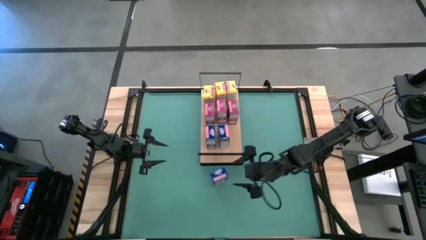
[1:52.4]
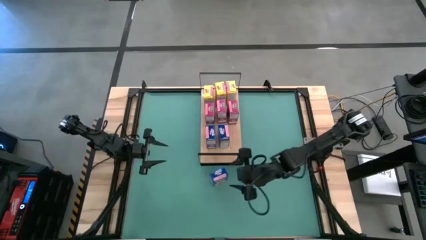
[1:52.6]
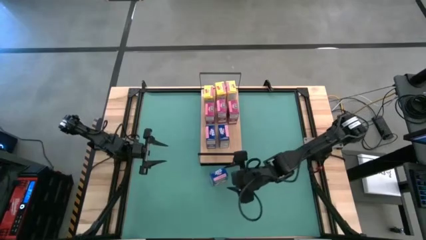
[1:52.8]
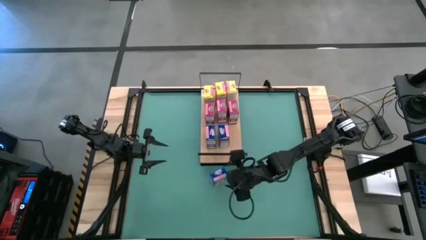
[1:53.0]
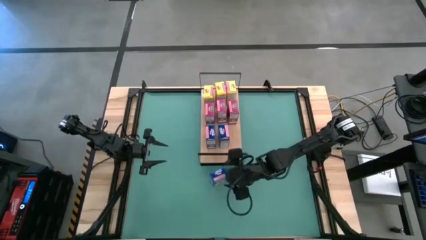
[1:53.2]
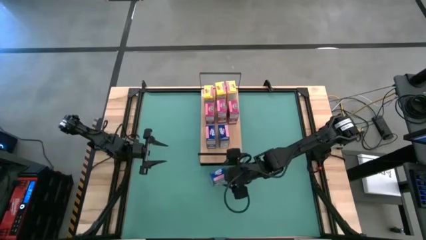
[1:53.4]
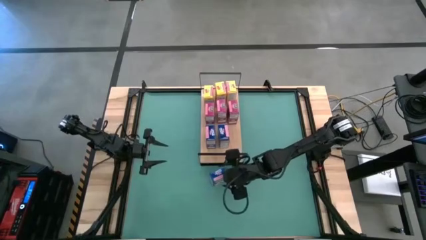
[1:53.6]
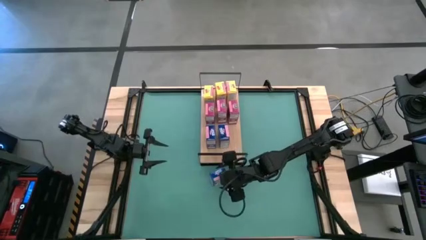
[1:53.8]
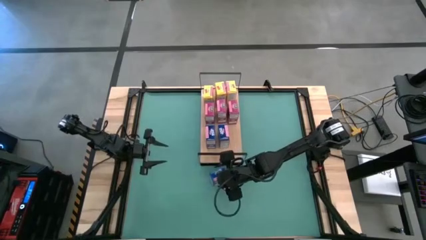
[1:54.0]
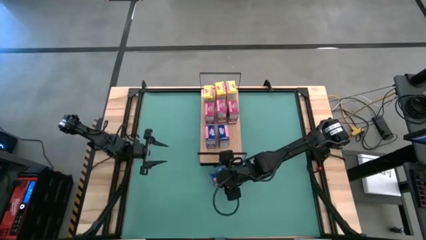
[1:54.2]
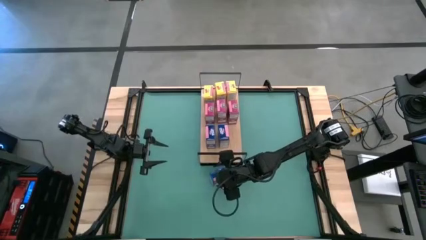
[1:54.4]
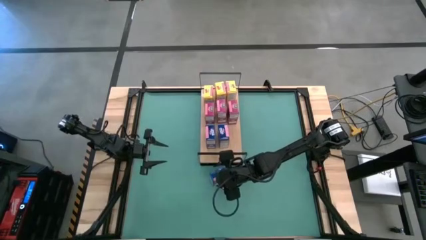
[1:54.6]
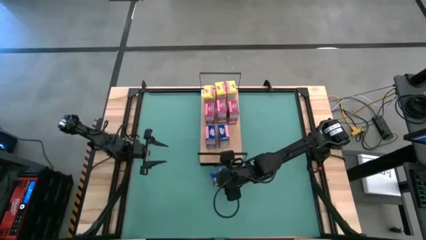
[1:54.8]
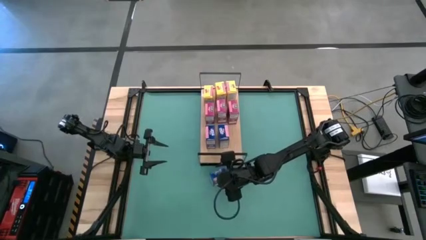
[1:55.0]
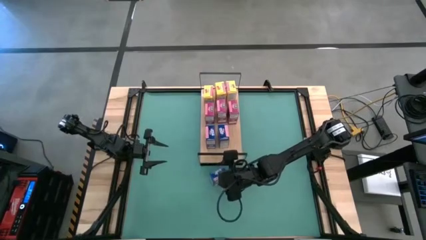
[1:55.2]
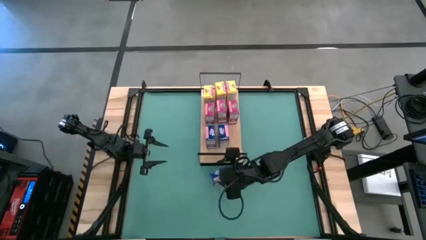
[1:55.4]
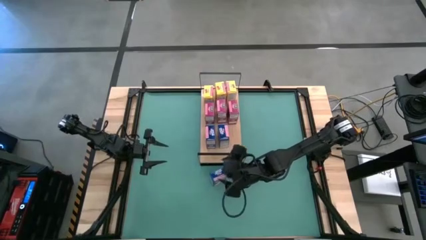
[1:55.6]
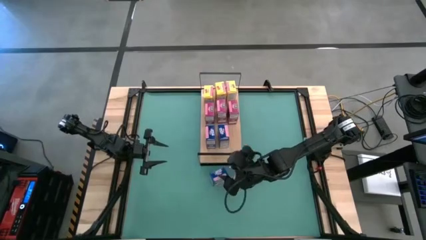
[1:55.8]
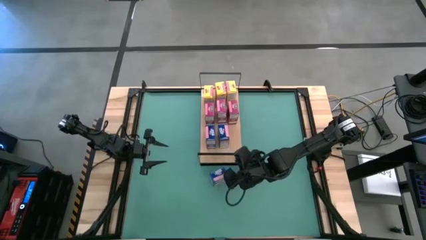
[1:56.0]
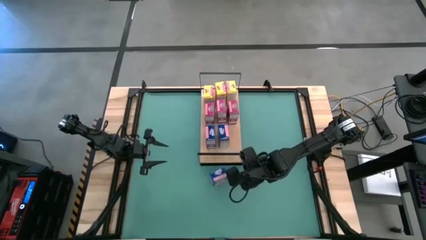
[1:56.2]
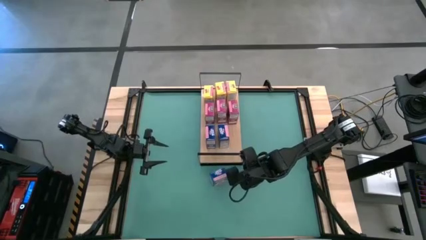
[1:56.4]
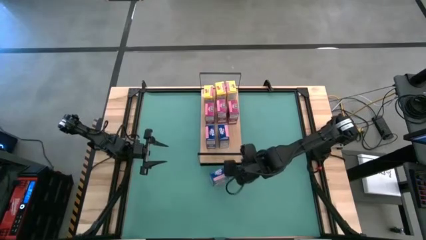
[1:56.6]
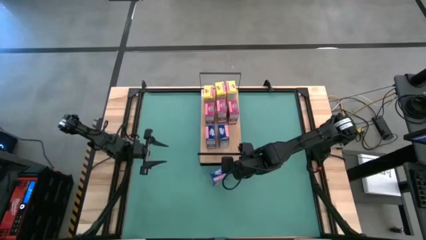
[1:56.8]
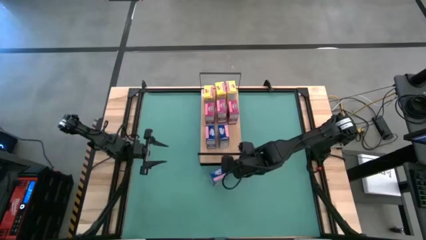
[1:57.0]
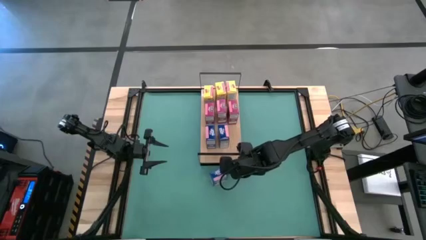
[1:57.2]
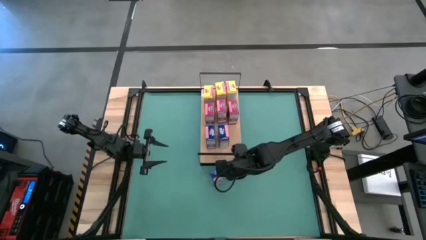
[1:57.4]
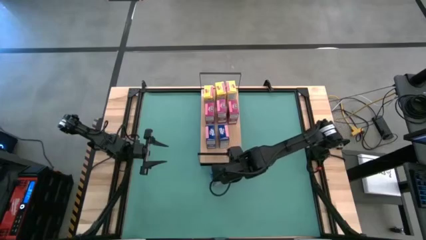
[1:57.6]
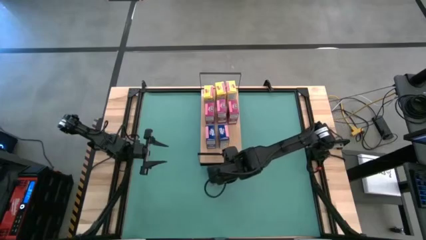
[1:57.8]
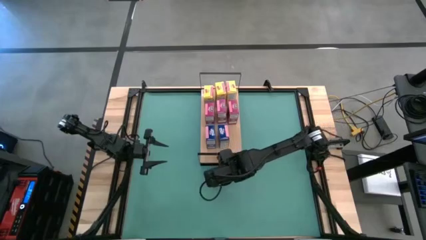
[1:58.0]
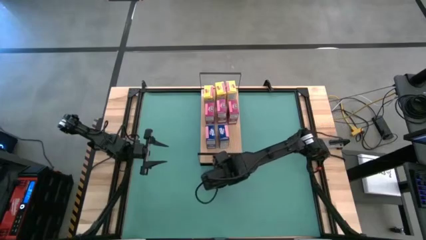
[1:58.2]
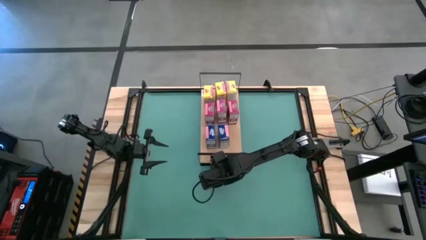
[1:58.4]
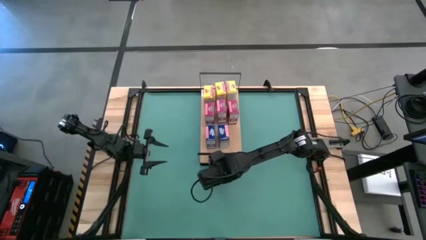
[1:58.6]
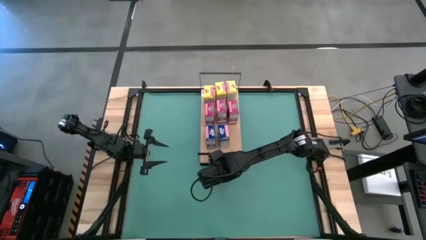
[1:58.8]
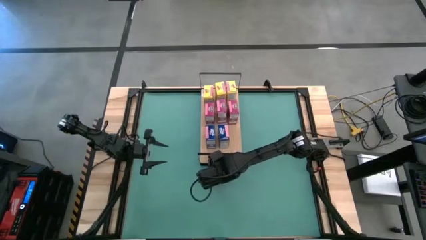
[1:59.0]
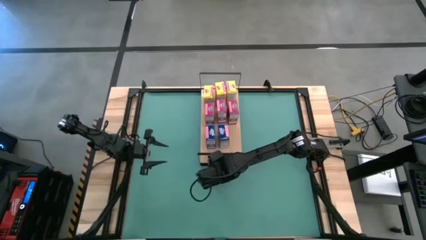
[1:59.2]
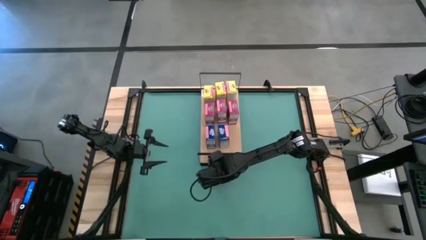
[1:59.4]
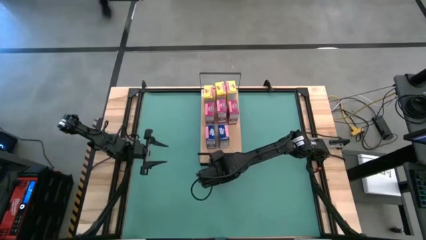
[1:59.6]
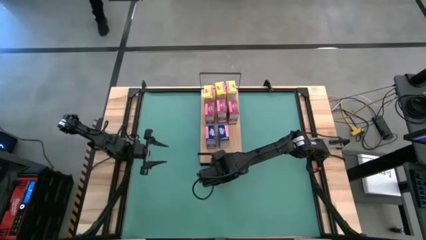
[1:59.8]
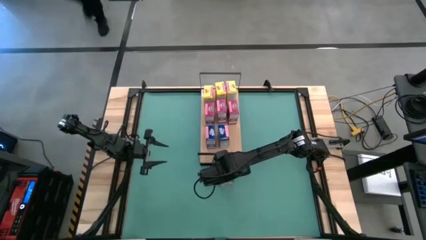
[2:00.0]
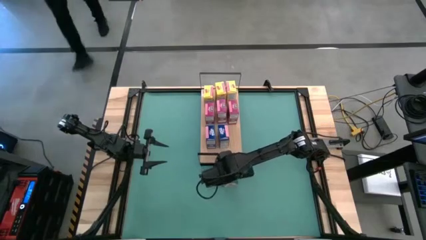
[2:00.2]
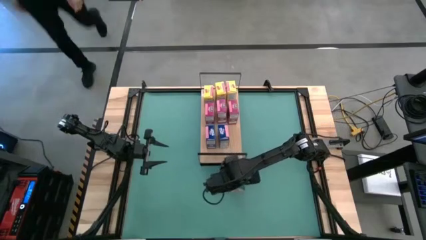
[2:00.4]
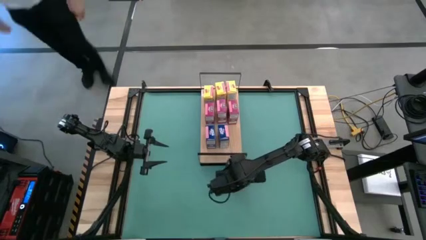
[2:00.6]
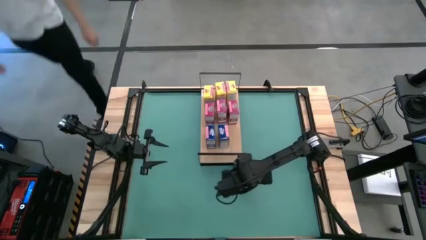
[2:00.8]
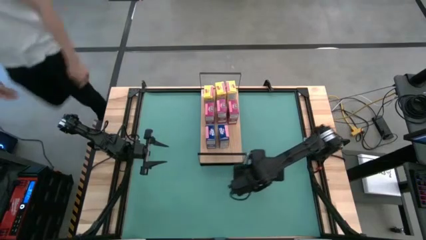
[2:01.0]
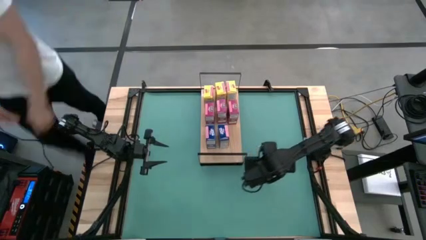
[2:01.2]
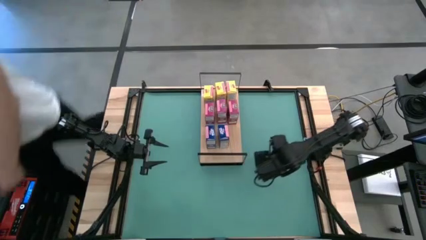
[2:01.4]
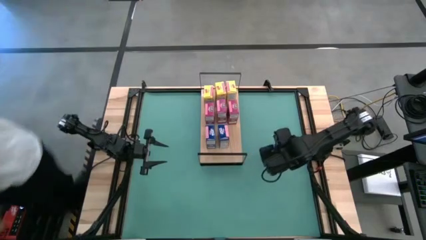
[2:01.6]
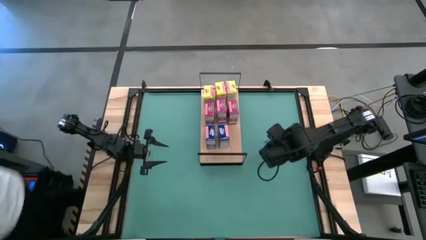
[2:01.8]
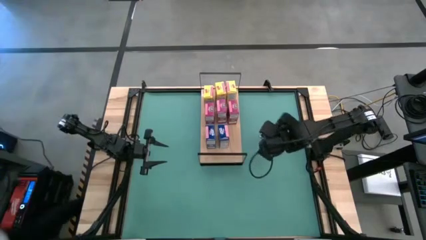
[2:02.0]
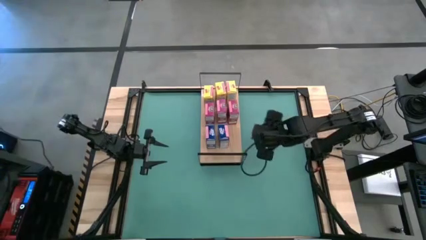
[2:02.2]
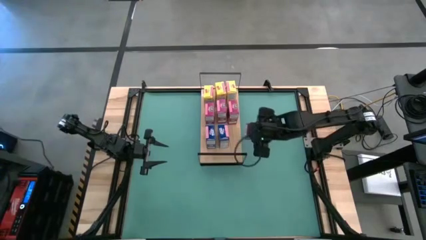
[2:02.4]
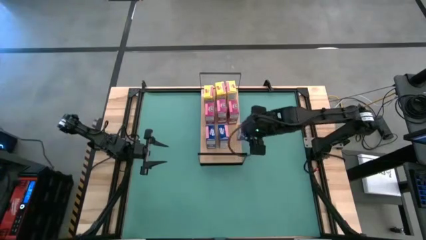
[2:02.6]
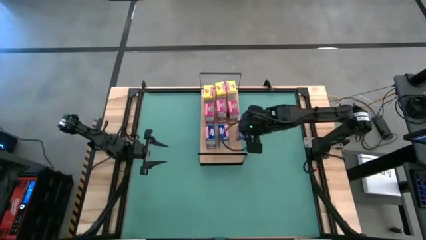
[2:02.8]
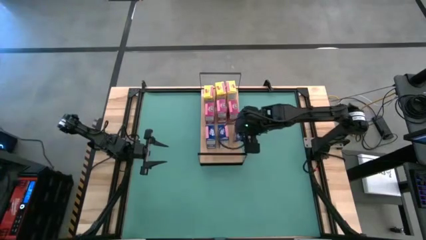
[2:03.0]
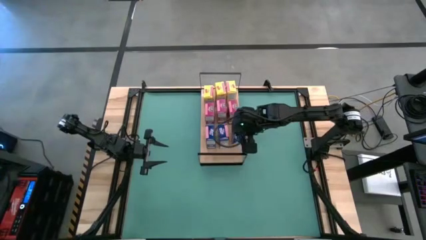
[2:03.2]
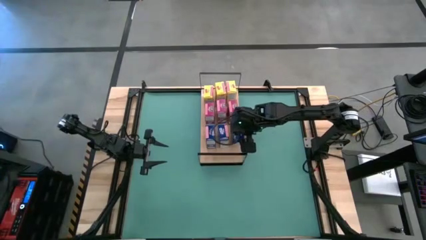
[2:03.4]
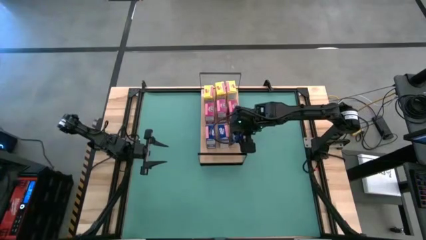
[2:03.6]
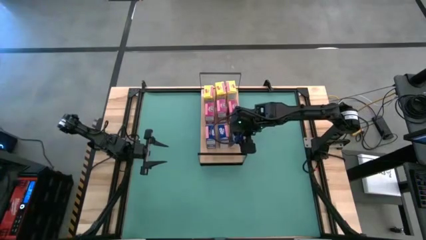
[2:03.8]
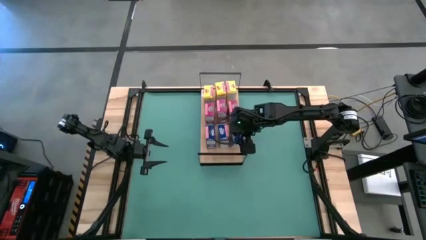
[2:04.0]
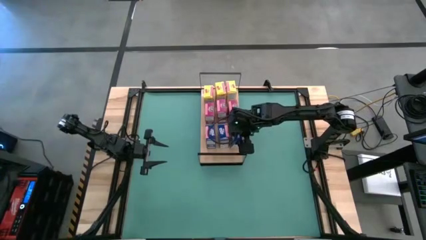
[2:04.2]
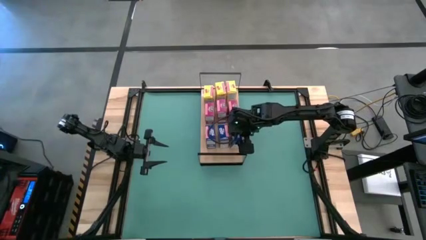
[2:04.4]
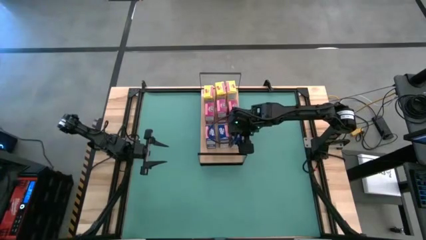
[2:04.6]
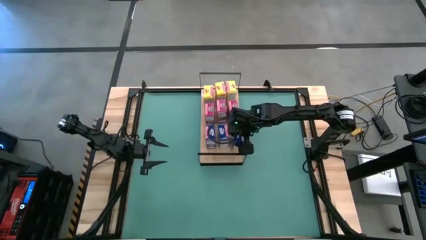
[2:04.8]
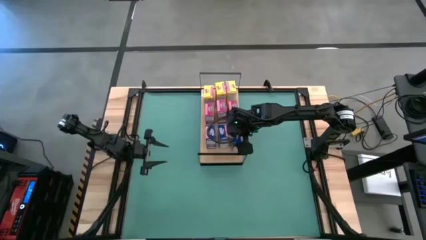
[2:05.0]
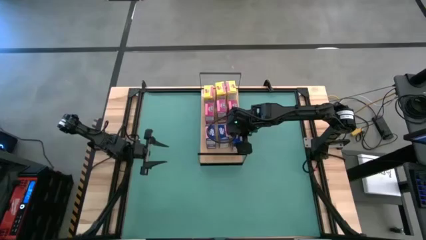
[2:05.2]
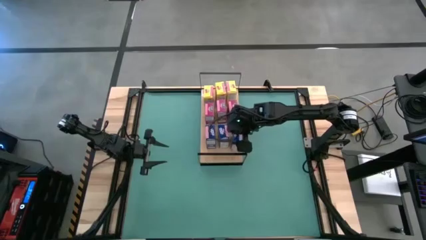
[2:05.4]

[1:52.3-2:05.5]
Task: Stack cereal on shelf
Put the blue cereal box on the shelf aligned with the other blue cereal boxes
